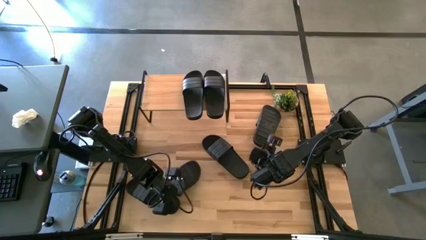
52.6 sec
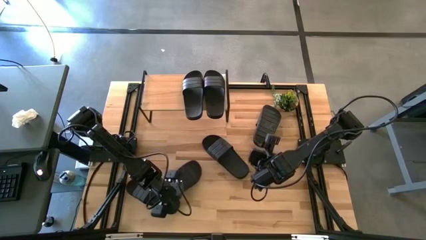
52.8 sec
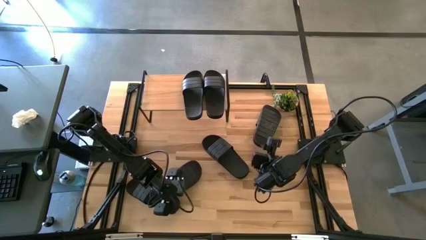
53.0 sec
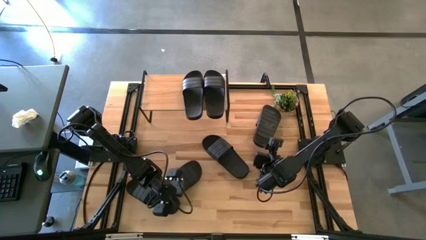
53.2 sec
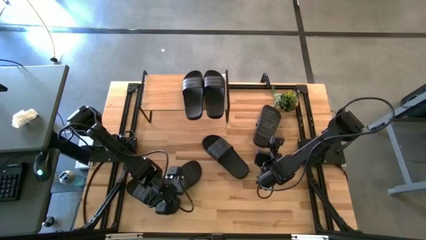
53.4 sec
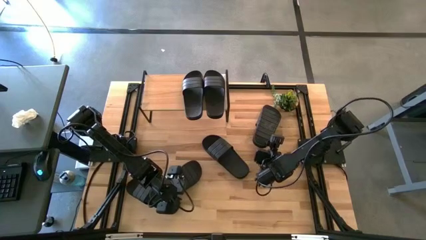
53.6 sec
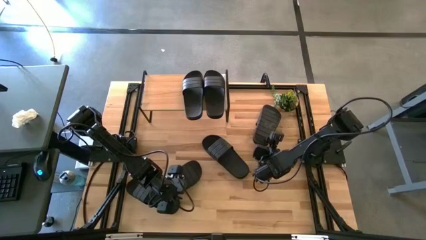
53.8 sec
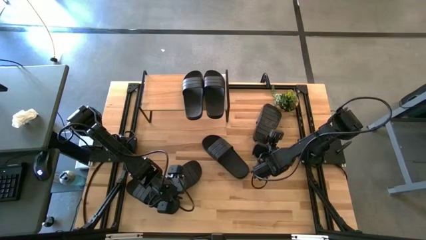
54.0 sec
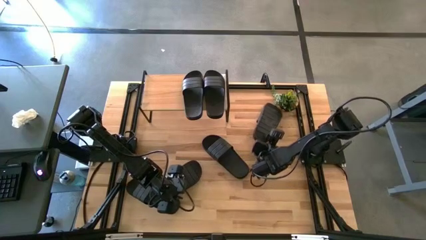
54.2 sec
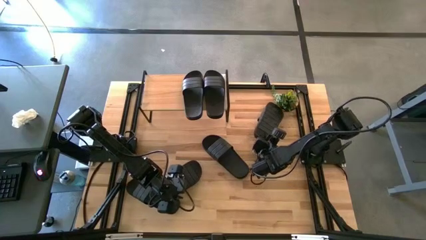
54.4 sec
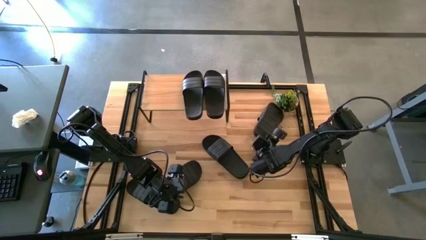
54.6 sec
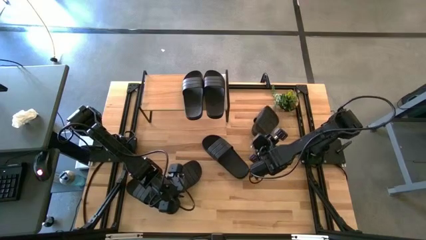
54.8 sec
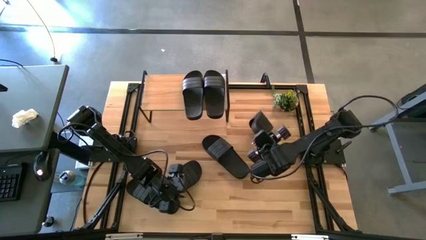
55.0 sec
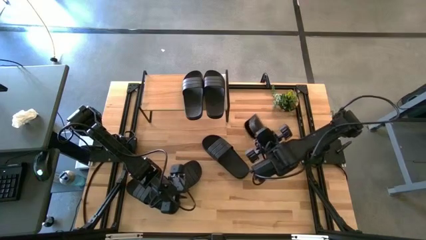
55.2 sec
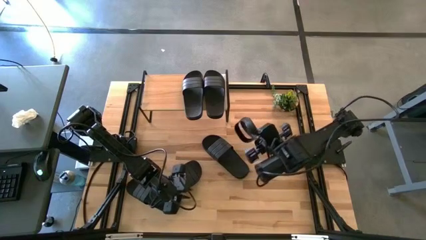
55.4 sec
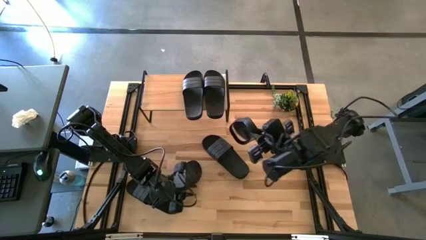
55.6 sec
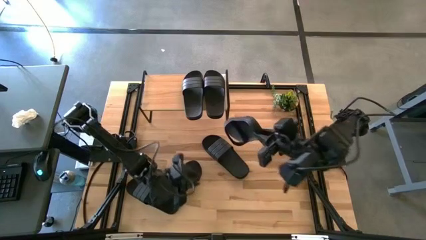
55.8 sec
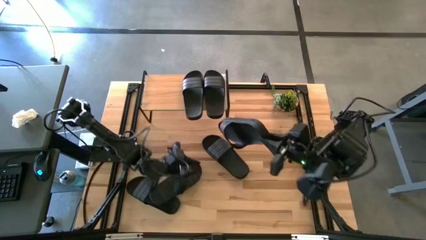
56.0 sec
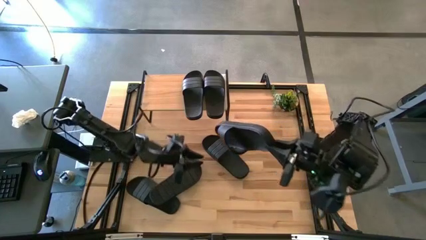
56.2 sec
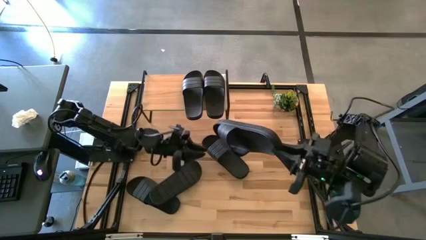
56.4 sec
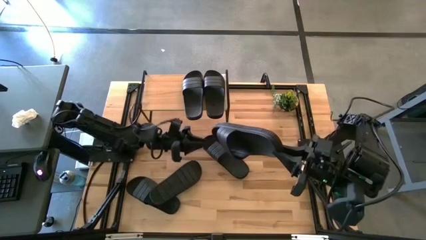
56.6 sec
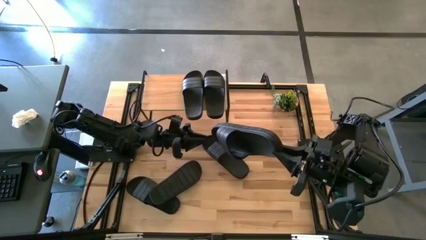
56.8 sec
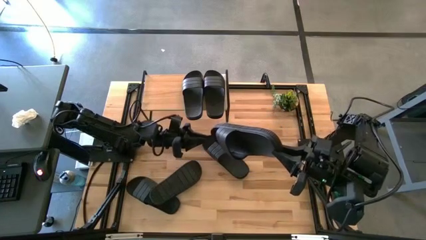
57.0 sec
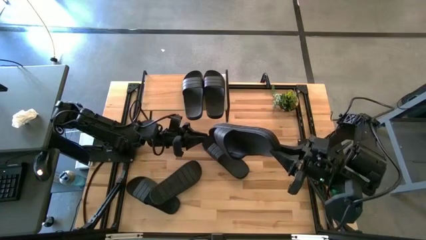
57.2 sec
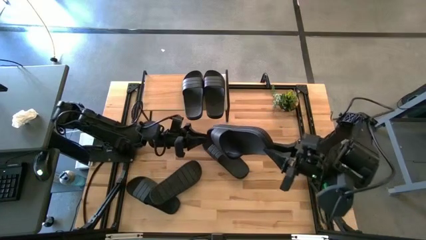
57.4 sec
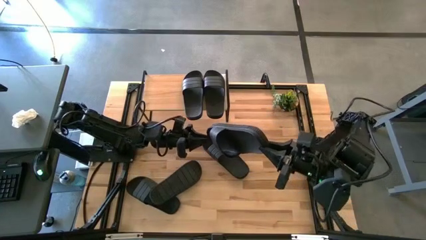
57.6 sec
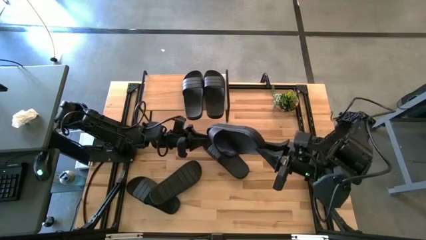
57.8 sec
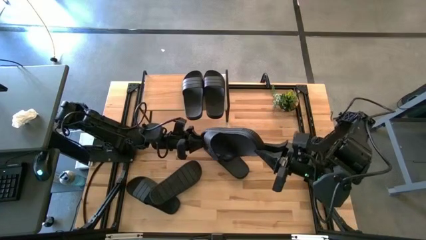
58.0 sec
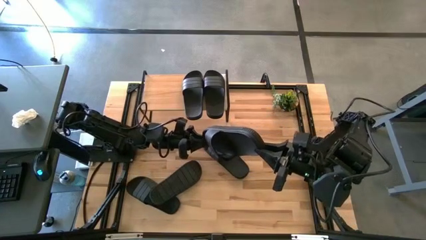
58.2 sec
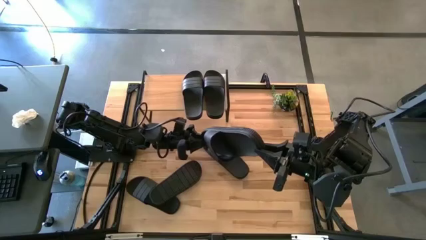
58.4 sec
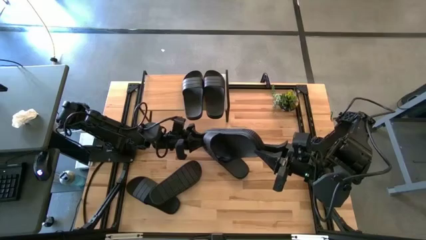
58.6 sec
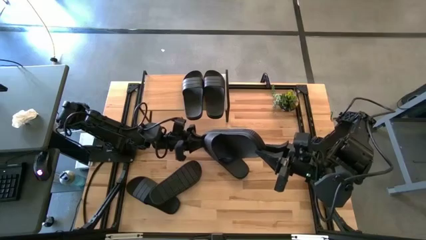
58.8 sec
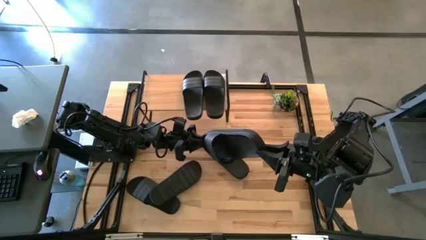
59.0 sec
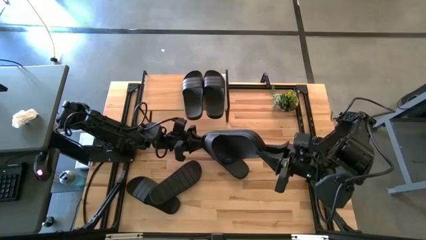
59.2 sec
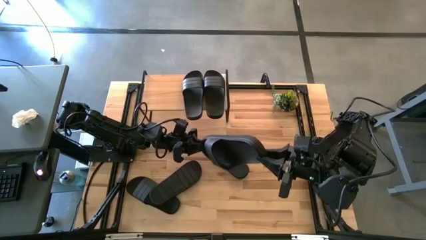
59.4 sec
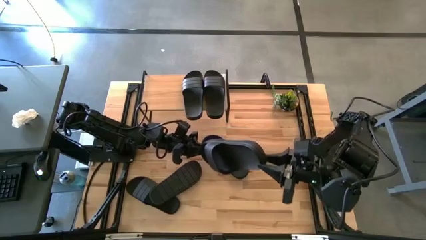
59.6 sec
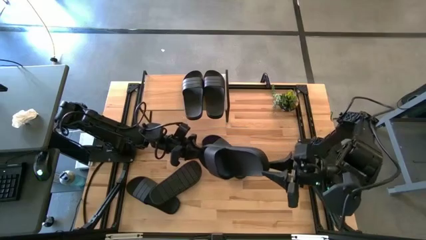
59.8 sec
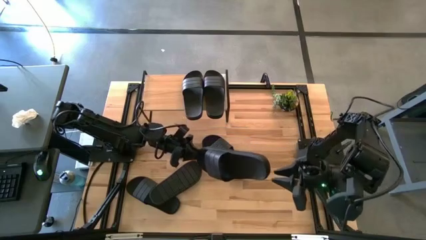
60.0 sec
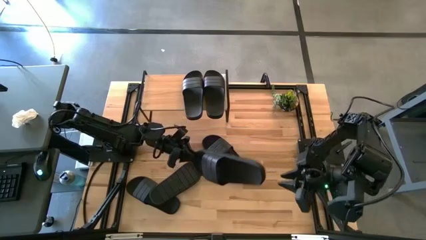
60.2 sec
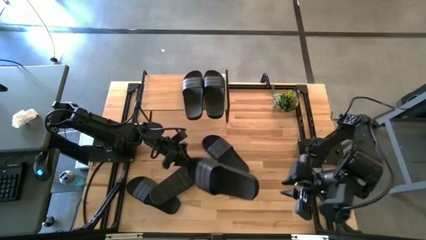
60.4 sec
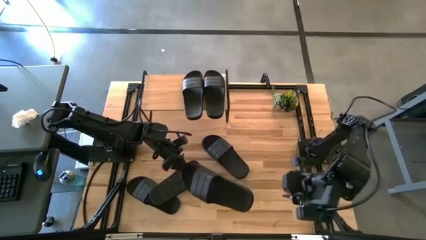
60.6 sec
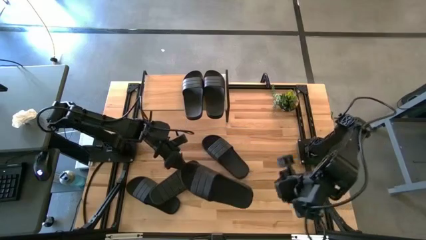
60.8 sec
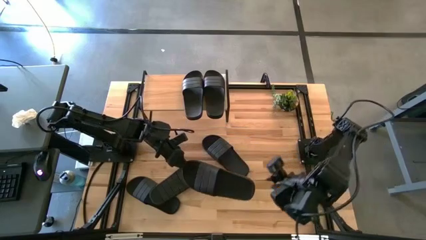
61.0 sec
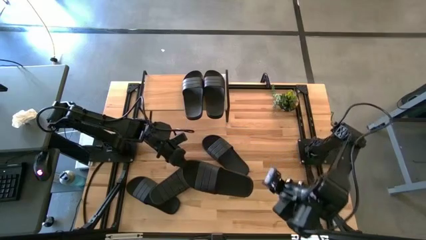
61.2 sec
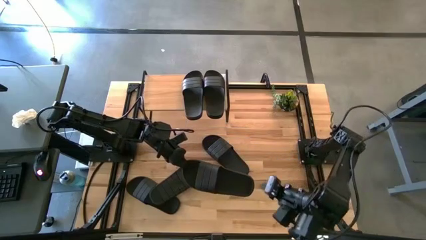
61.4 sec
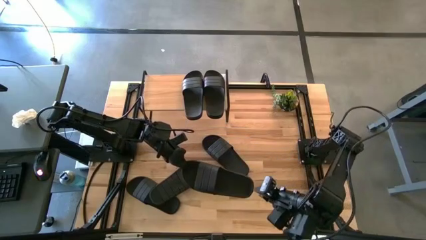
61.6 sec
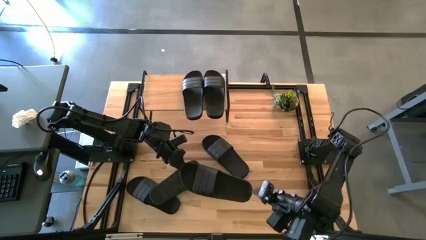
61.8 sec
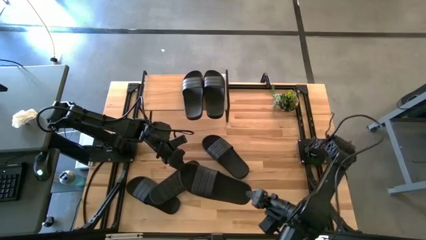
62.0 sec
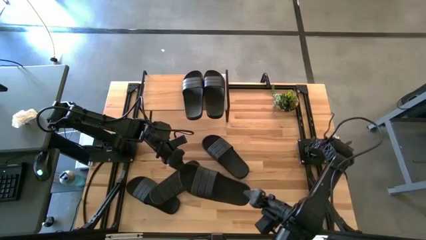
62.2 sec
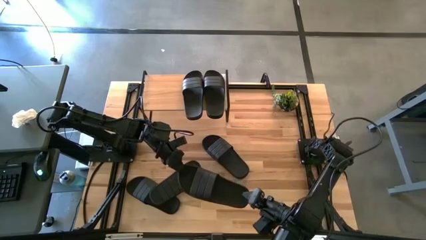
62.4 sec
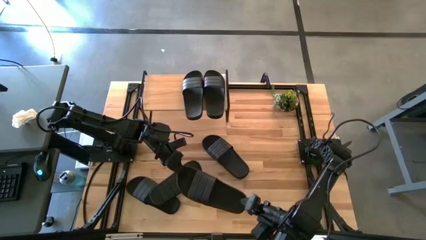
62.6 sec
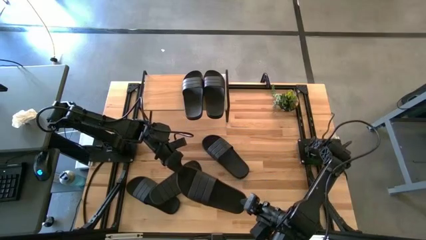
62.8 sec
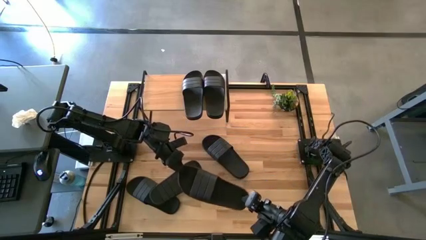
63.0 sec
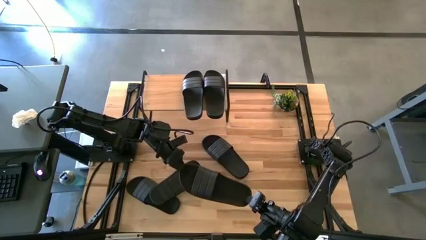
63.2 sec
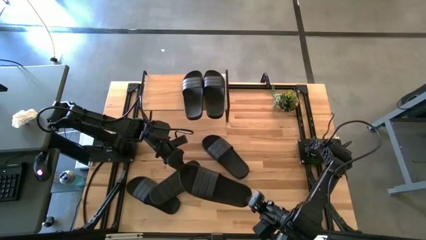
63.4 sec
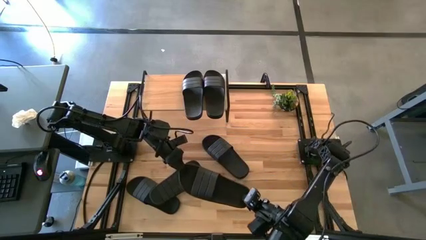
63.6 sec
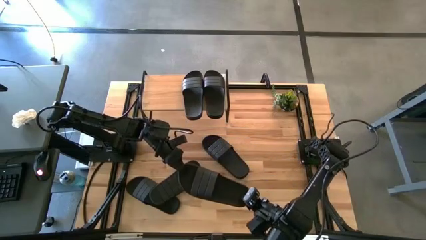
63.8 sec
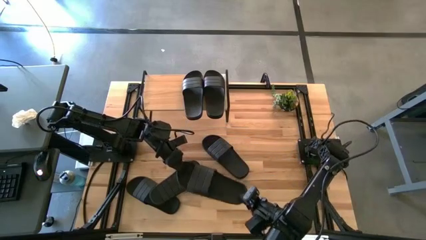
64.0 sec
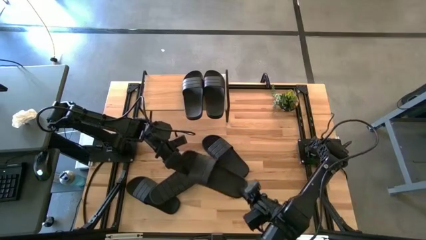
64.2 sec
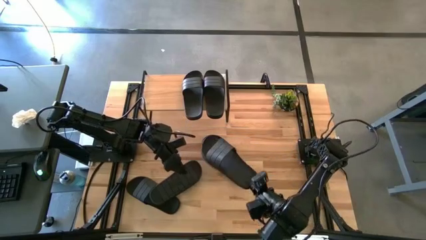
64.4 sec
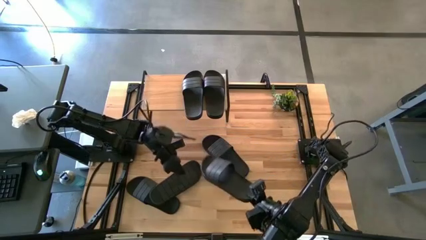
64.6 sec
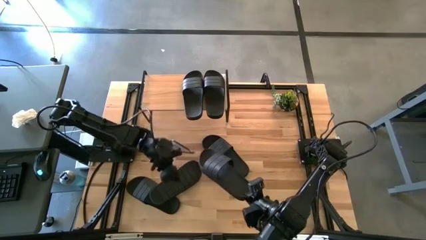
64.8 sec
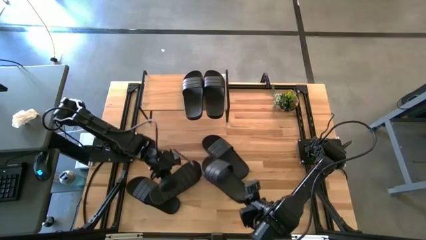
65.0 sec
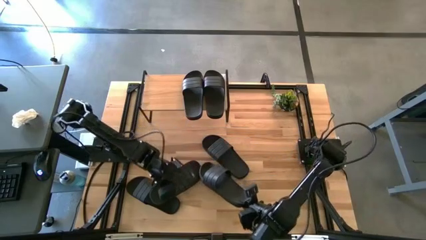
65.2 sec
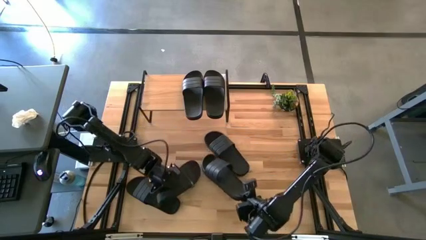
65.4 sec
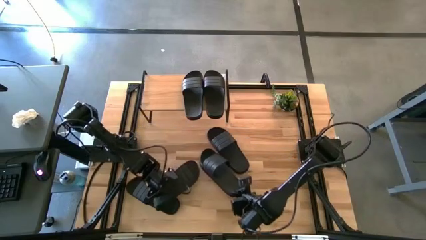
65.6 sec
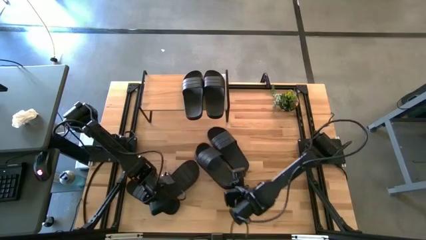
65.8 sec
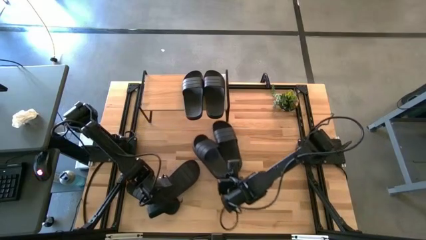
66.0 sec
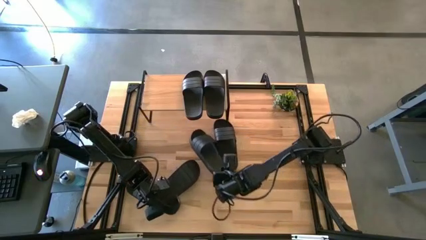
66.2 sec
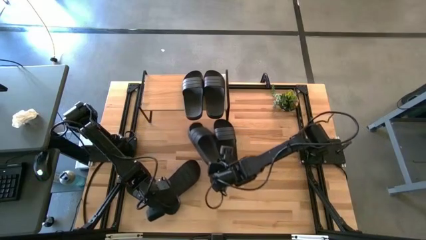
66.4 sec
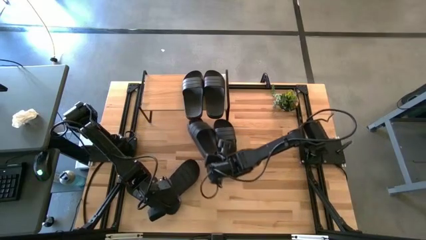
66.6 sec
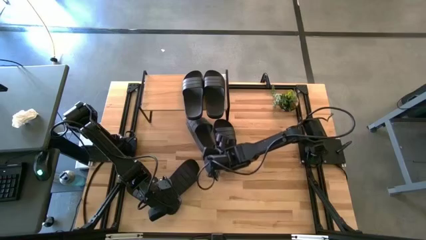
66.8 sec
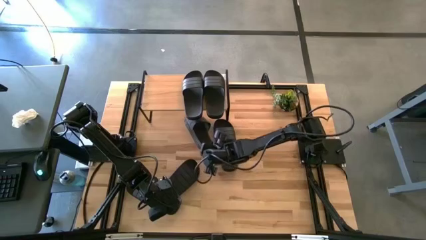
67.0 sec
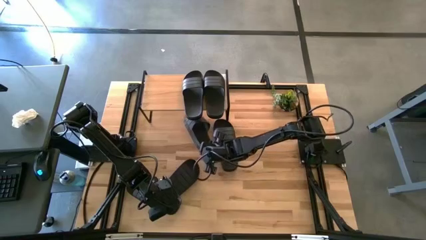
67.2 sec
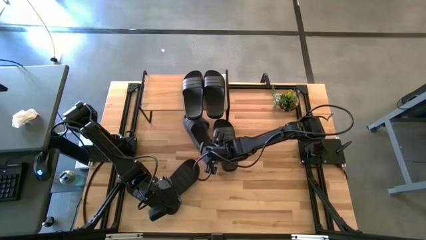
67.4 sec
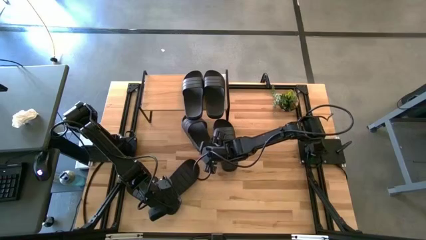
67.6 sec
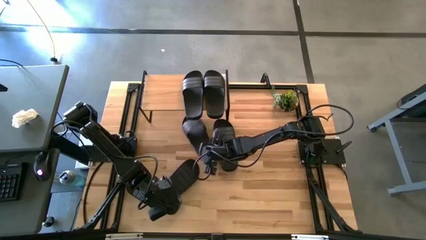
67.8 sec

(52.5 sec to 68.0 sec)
Task: Pick and place slides into the shelf
Move the black slipper to the top left of the table

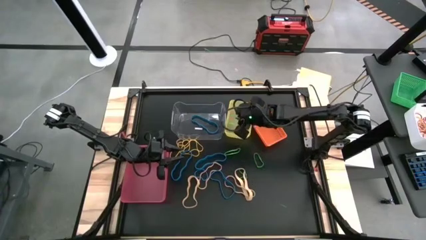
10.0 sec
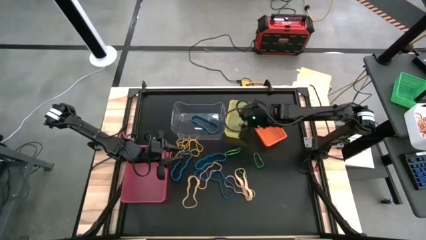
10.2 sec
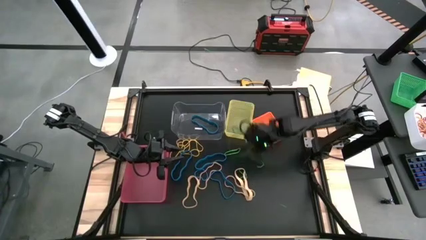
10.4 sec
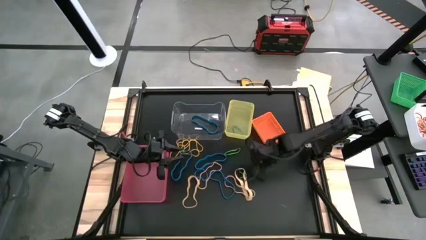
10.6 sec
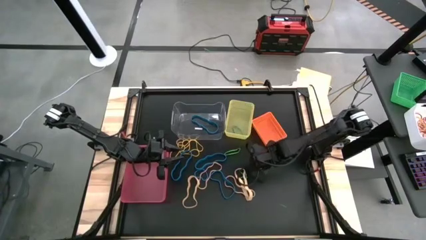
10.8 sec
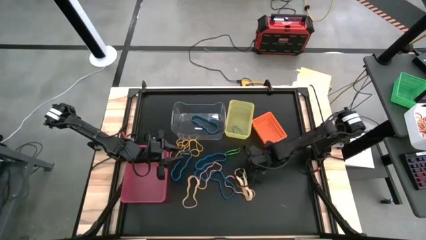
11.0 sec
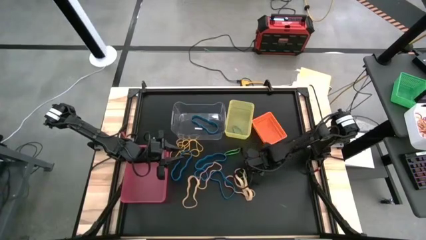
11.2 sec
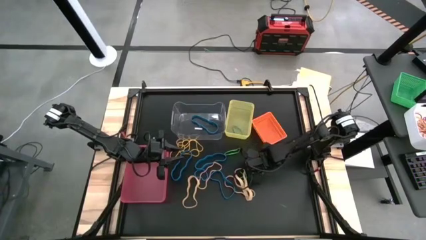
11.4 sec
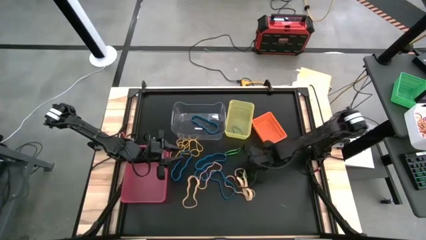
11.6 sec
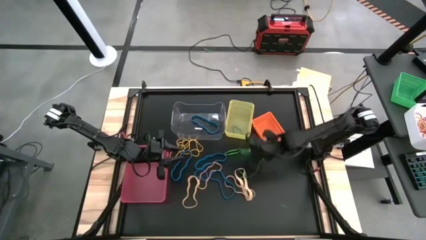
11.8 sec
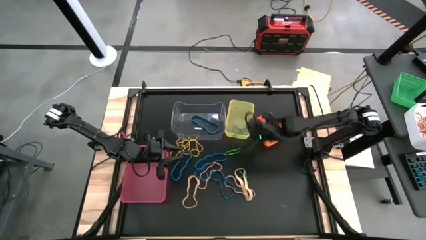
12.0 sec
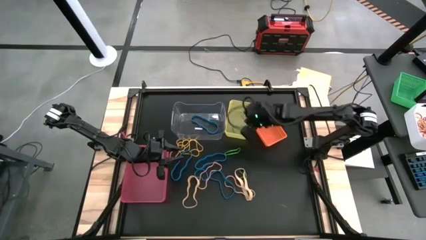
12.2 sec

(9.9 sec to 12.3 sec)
Task: Sort rubber bands into baskets
Put the green rubber band into the yellow bin

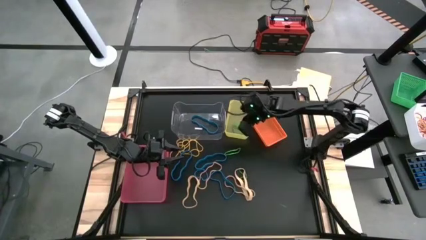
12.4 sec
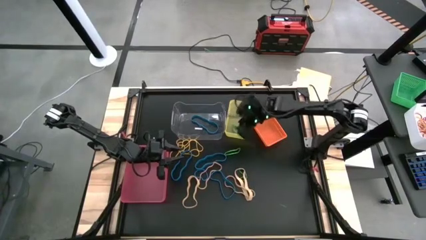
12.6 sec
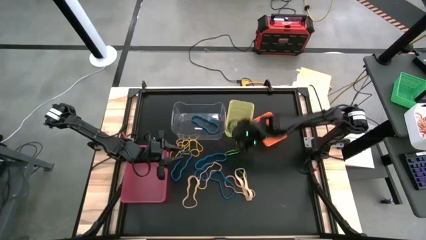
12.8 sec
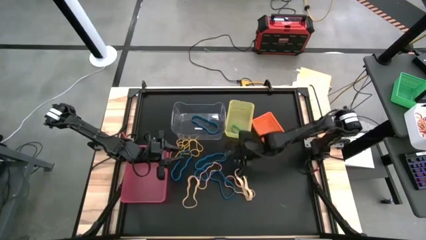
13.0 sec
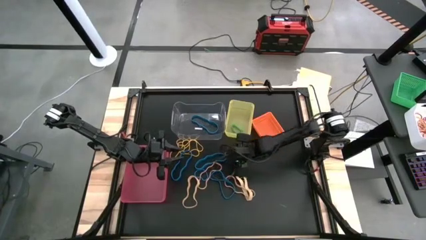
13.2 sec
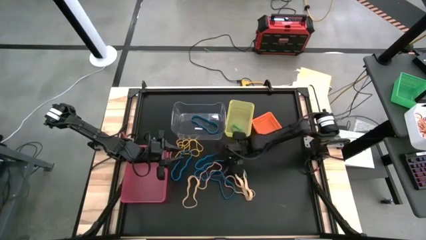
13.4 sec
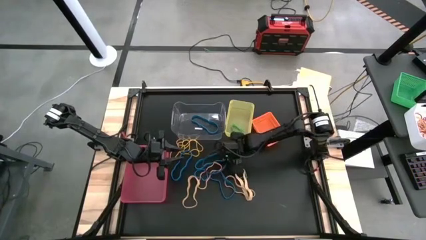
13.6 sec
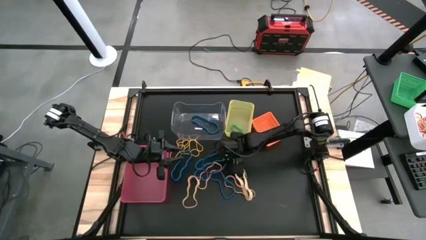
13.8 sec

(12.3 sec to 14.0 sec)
Put the green rubber band into the yellow bin
